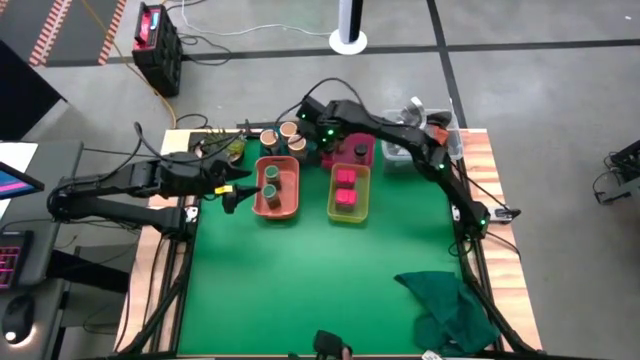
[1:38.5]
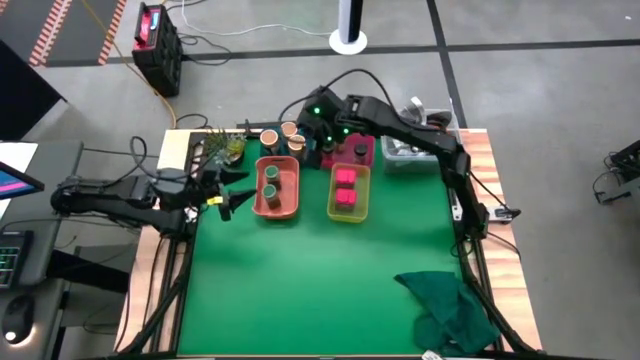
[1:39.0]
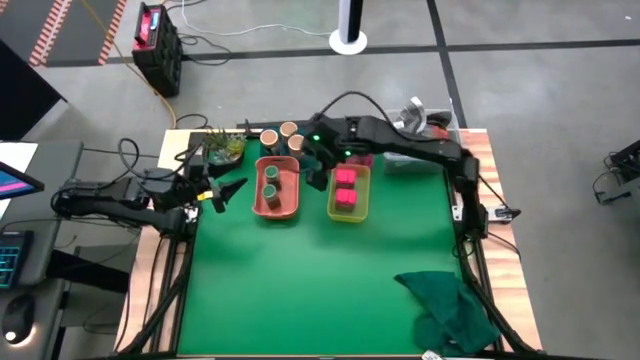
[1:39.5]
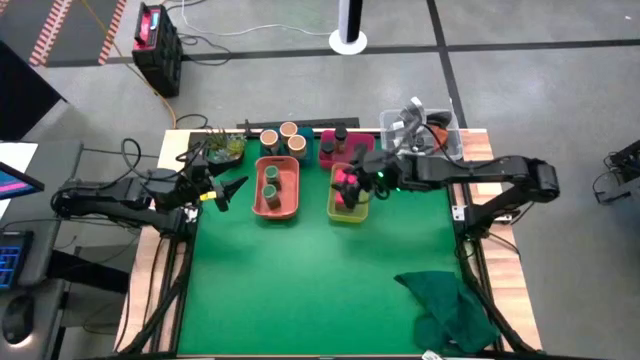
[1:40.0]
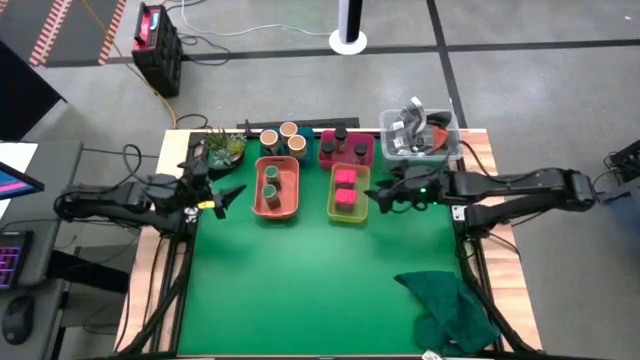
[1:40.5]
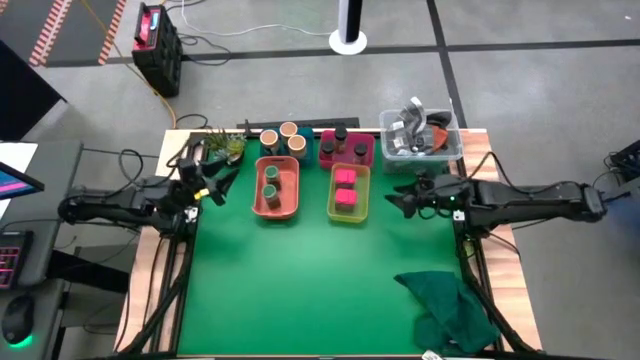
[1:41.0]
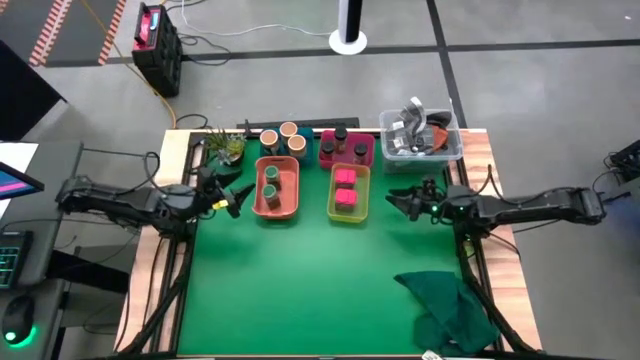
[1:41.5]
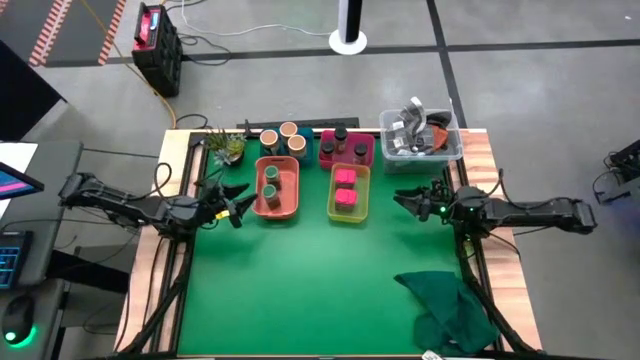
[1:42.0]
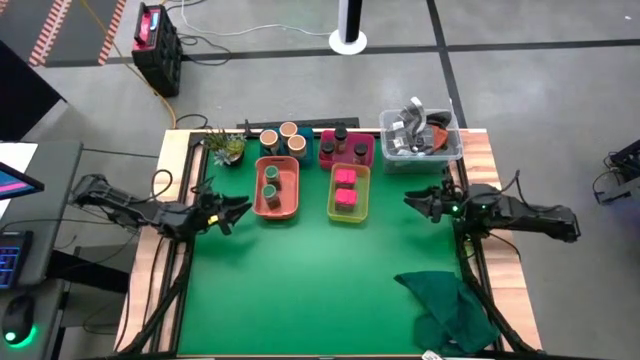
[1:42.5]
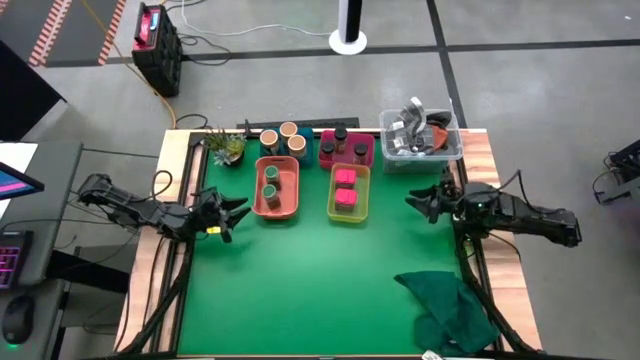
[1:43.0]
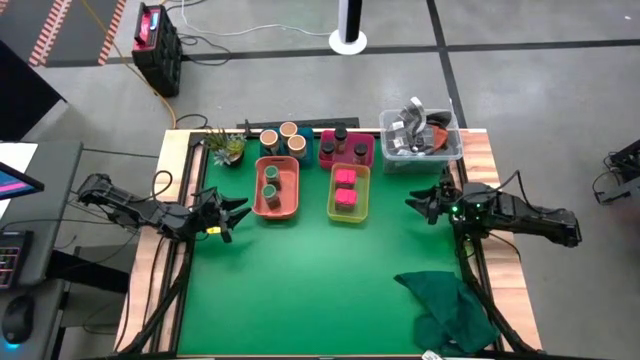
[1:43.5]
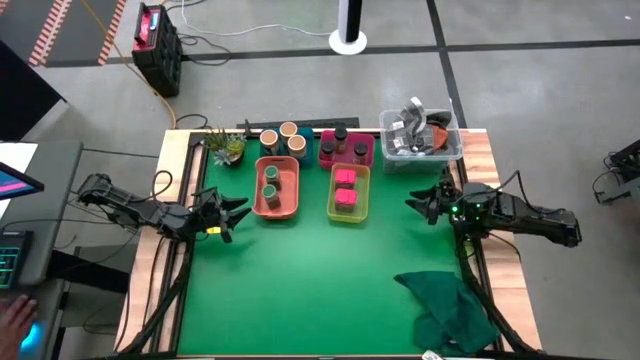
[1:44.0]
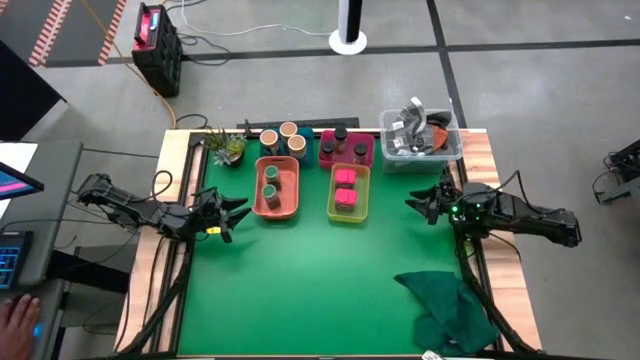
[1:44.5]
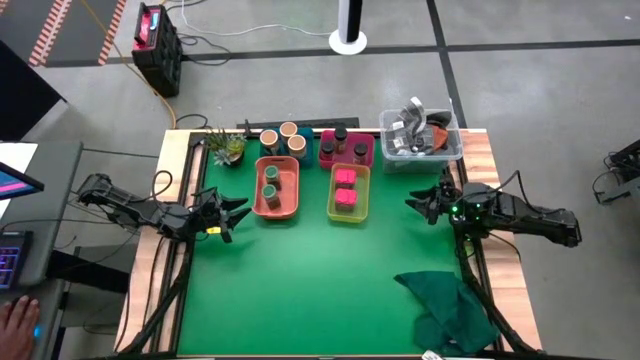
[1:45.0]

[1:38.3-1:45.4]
Task: Sort spices by type
Return to home position

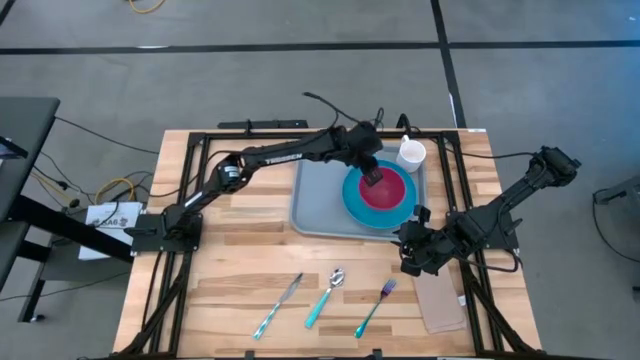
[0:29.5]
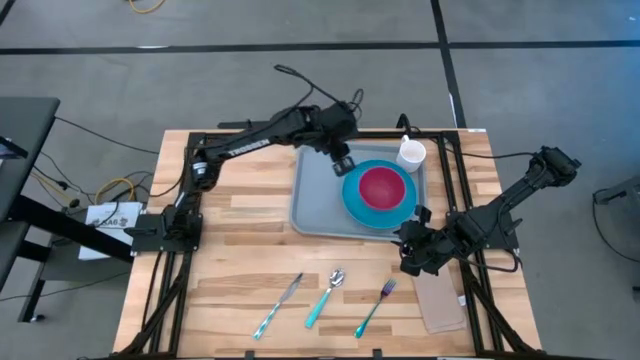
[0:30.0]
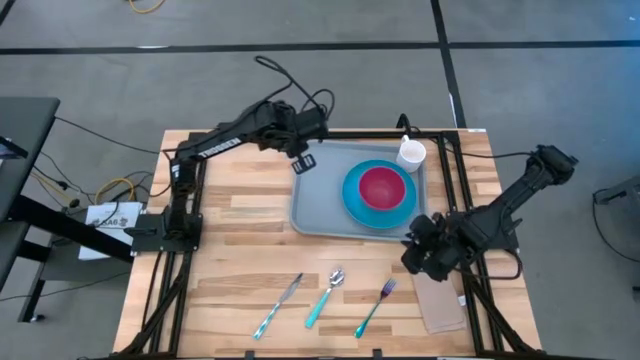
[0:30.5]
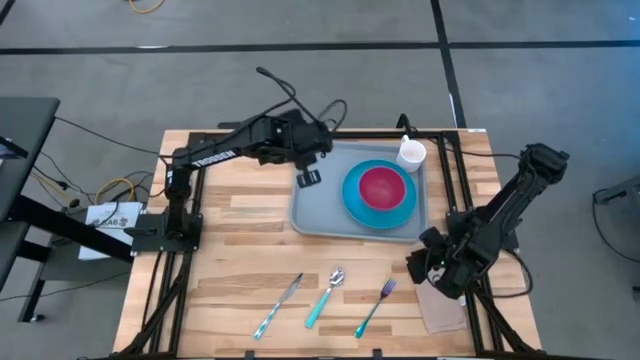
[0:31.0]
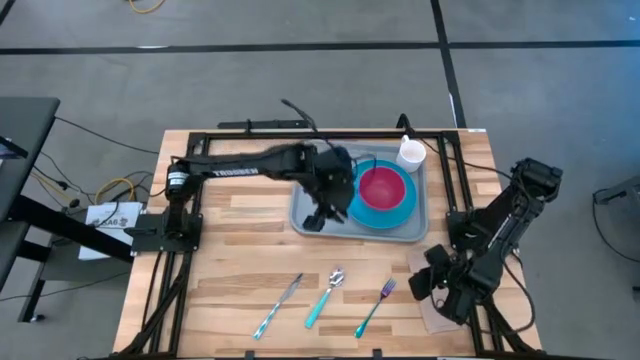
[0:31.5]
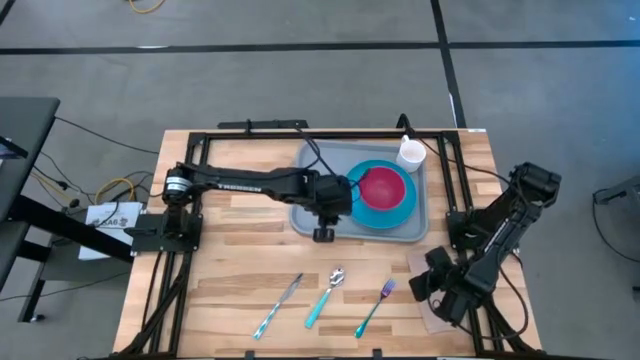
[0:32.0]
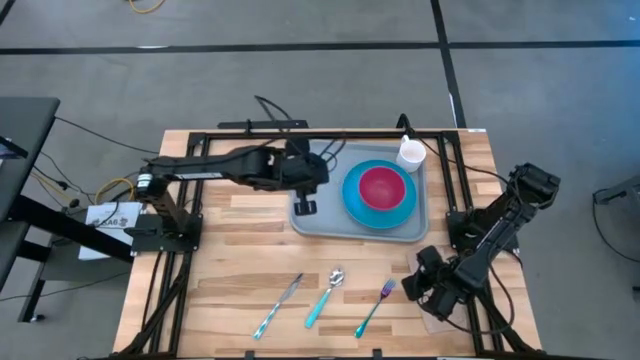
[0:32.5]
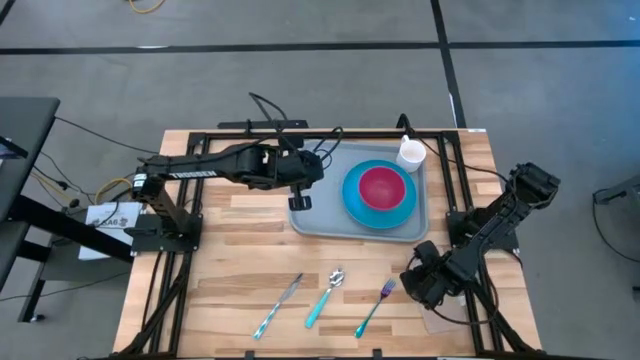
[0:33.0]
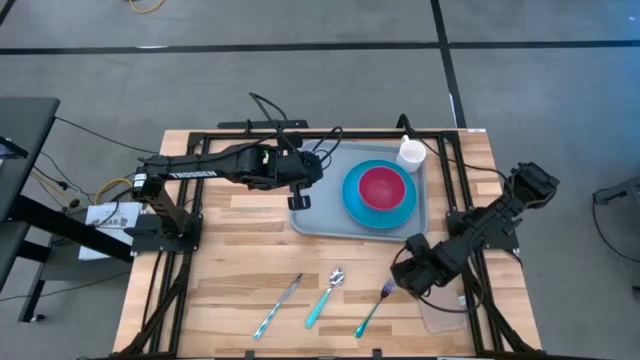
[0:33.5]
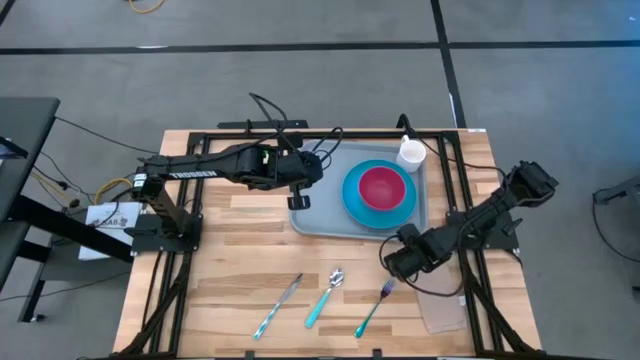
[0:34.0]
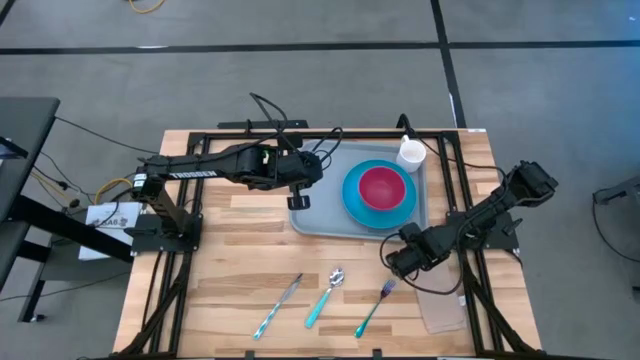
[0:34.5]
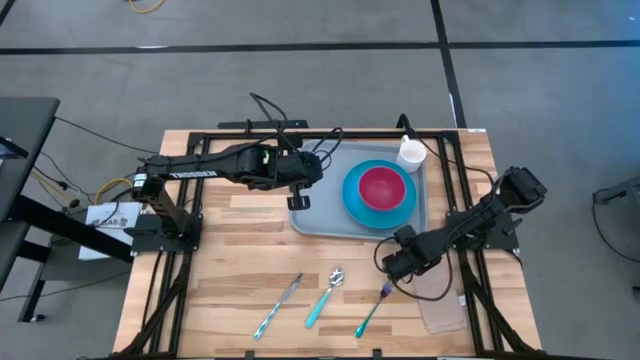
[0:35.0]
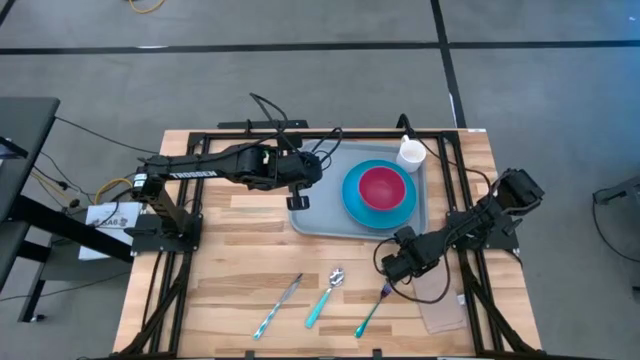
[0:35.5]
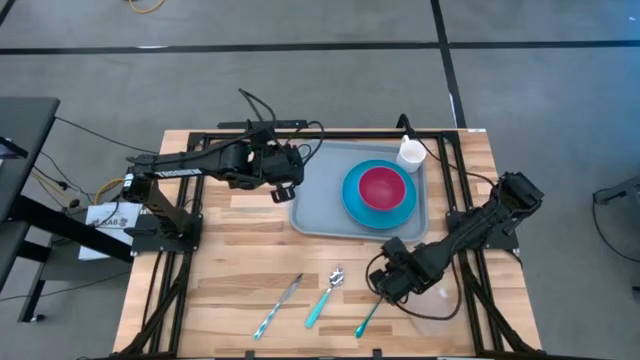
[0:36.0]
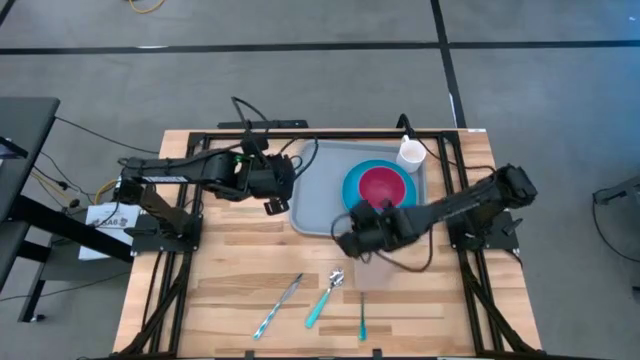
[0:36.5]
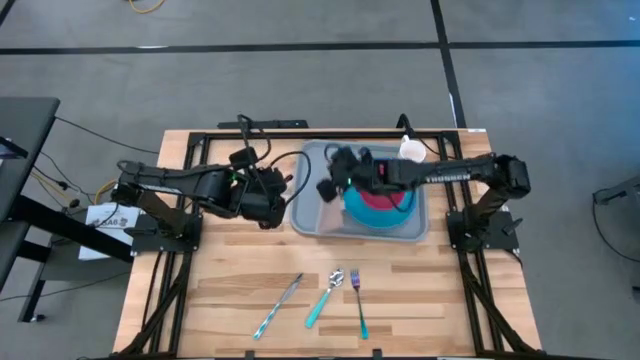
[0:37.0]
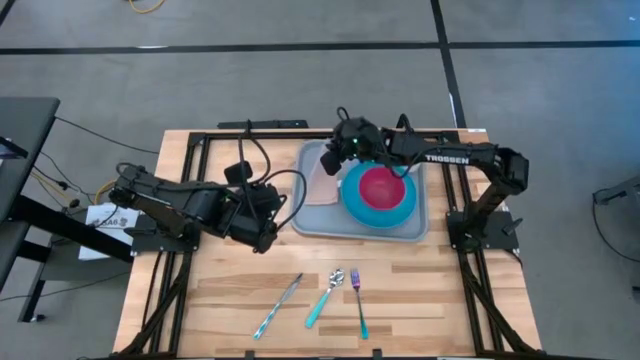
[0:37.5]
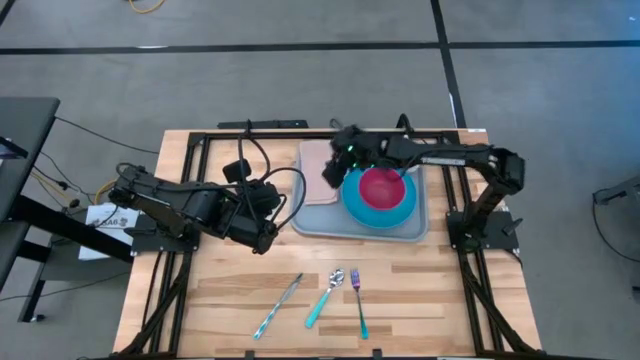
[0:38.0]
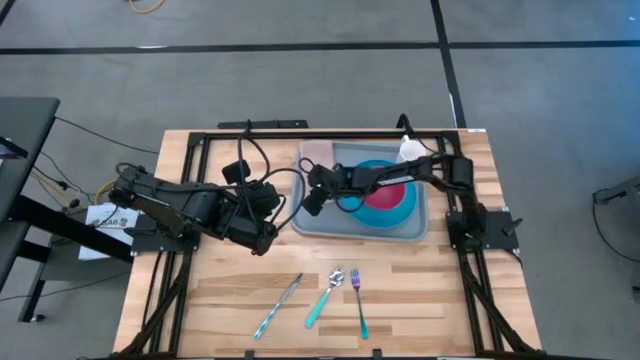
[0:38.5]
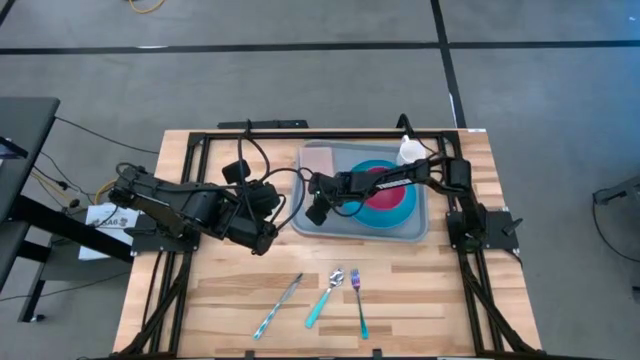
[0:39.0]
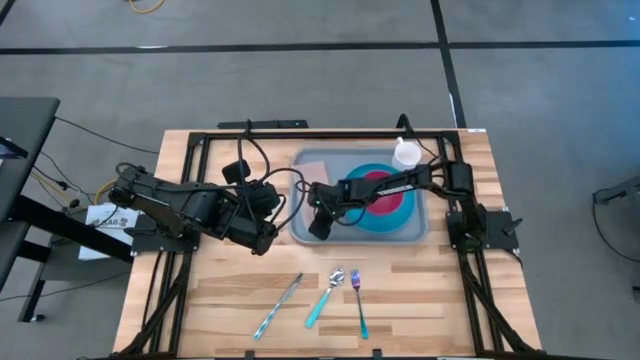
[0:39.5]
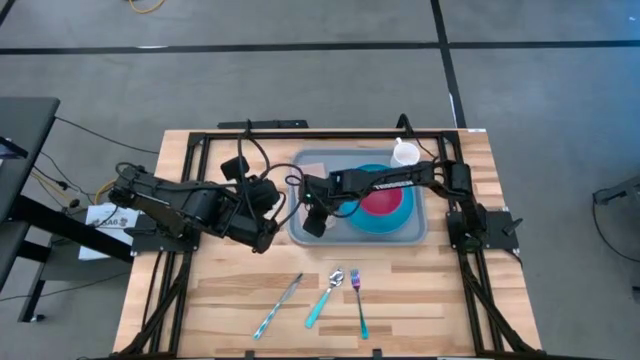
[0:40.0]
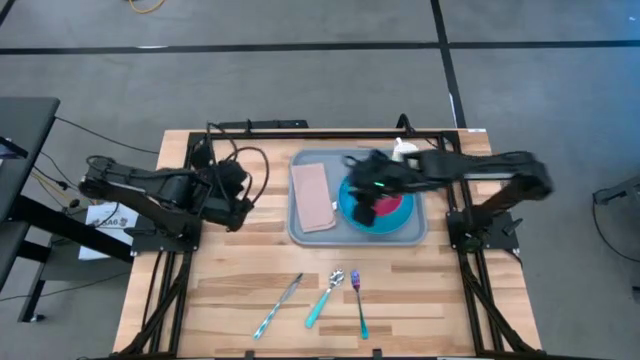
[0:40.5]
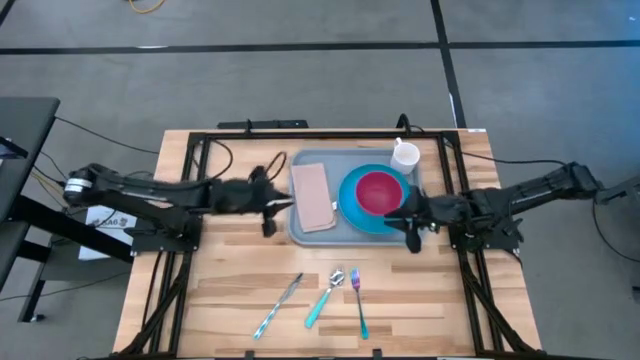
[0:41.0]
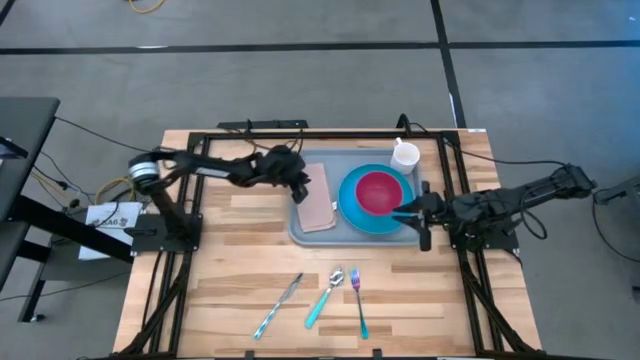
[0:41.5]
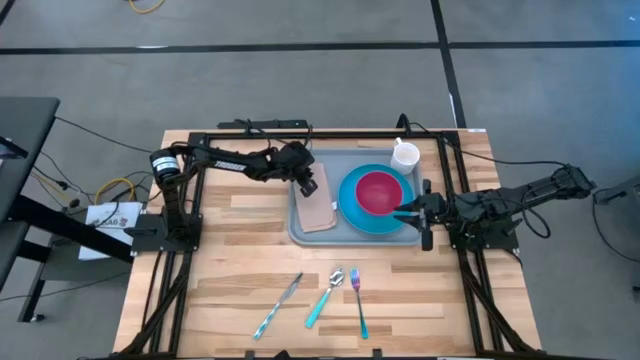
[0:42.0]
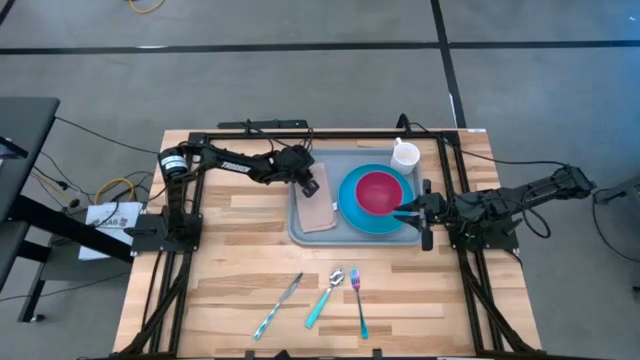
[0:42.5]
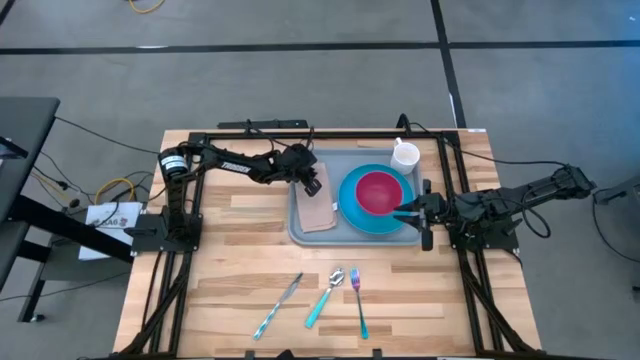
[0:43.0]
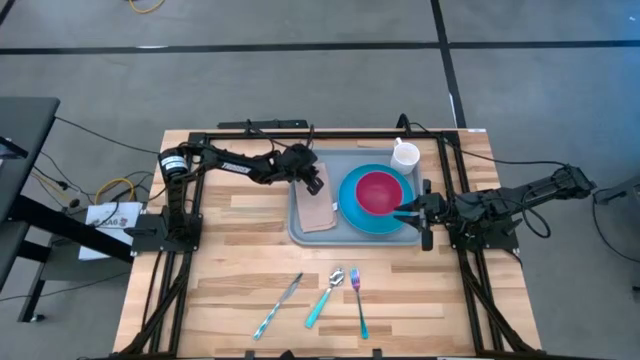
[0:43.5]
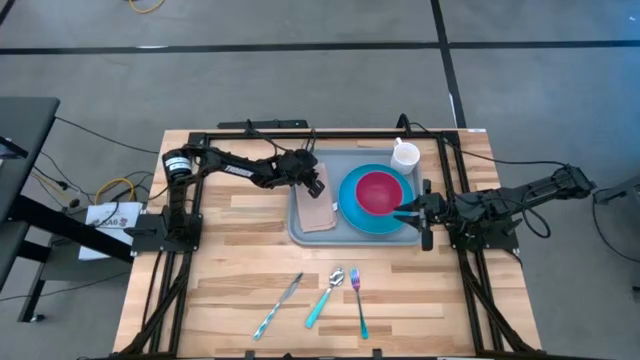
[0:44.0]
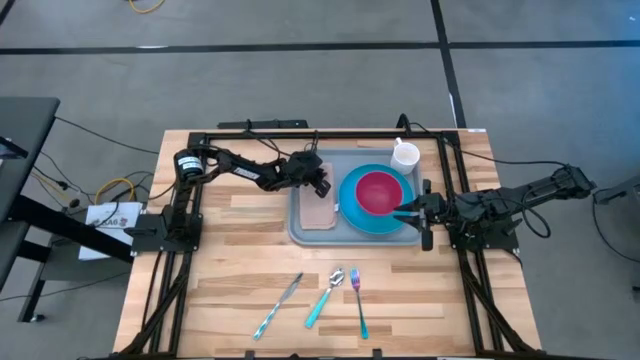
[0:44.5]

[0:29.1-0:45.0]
Task: Set up tray
Put the light brown table napkin to the left of the blue plate on the gray serving tray
